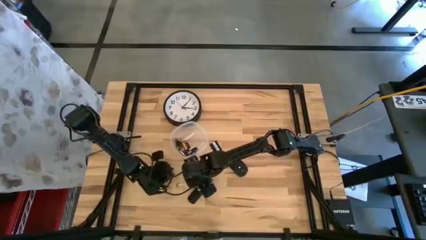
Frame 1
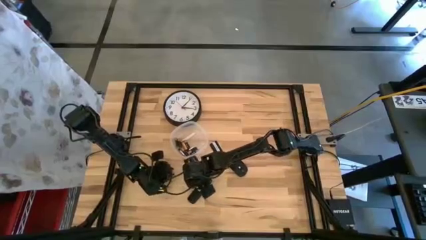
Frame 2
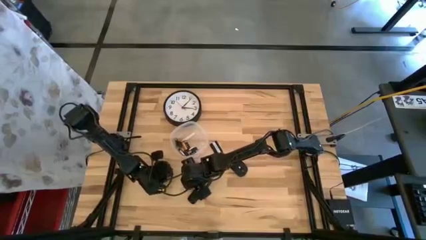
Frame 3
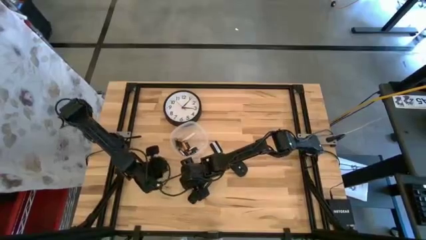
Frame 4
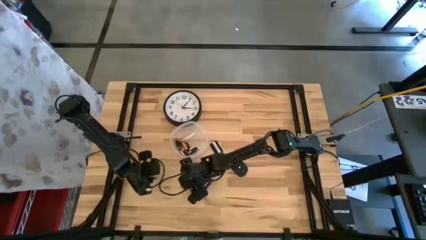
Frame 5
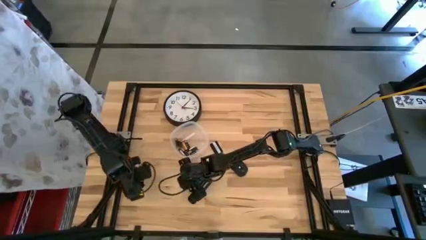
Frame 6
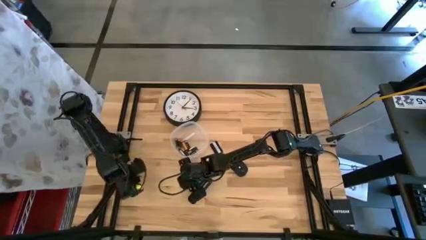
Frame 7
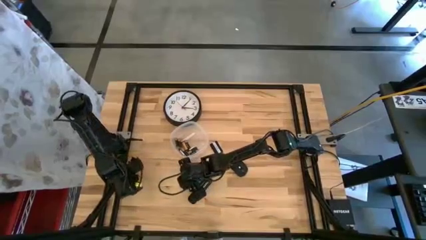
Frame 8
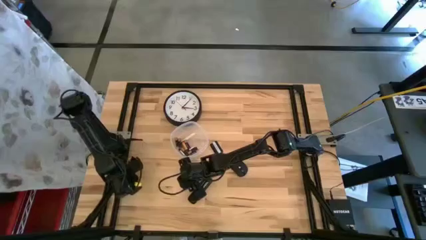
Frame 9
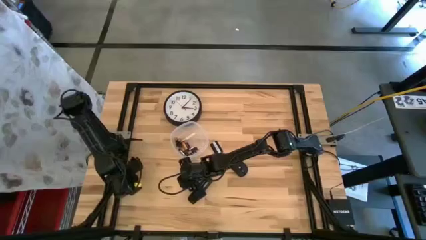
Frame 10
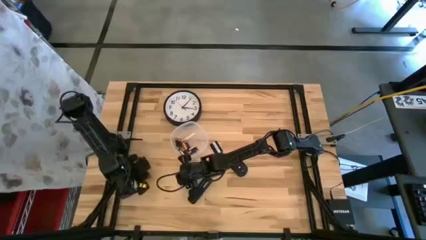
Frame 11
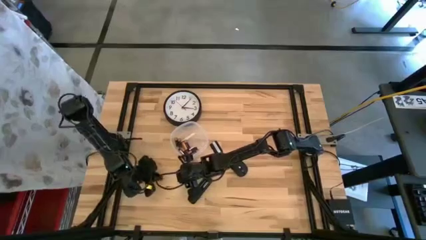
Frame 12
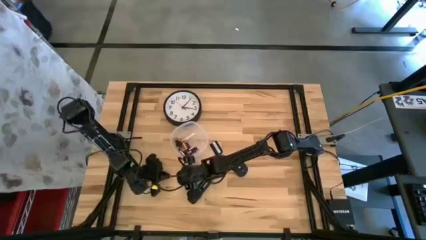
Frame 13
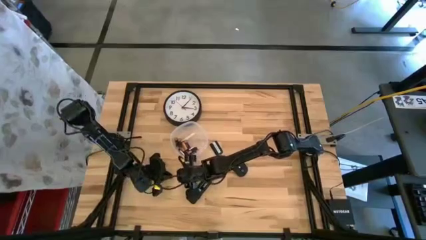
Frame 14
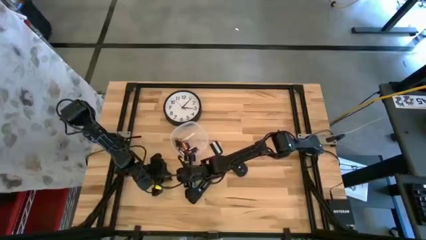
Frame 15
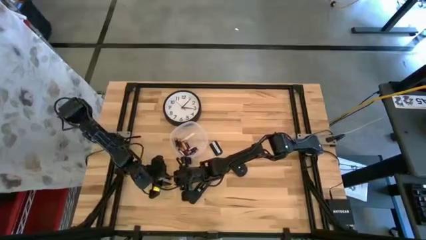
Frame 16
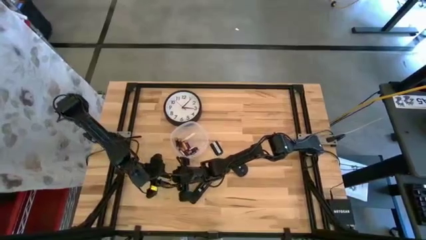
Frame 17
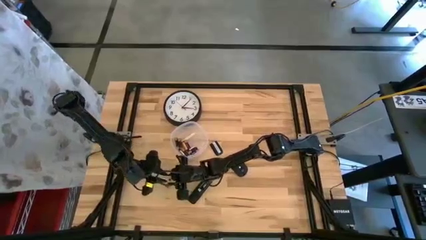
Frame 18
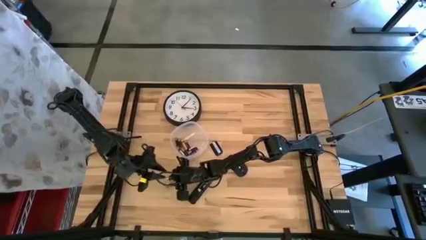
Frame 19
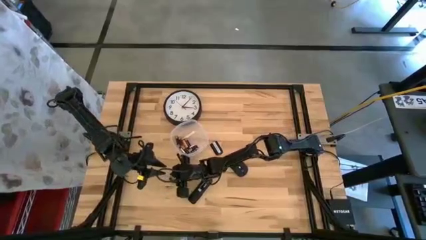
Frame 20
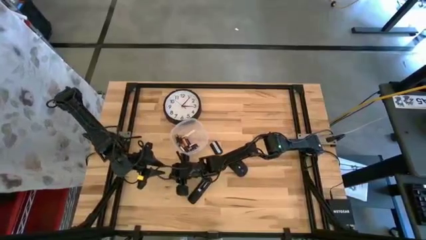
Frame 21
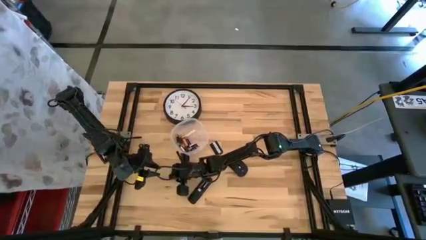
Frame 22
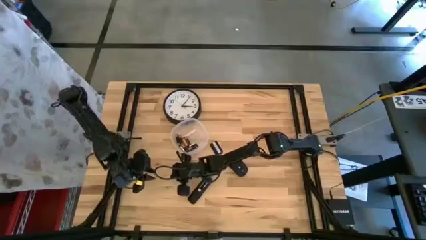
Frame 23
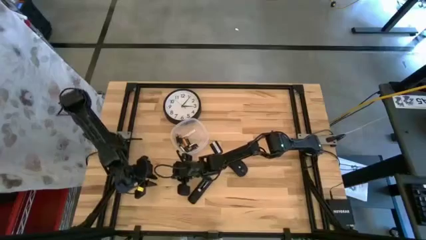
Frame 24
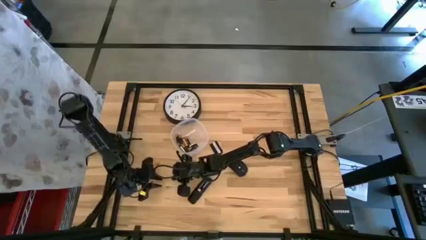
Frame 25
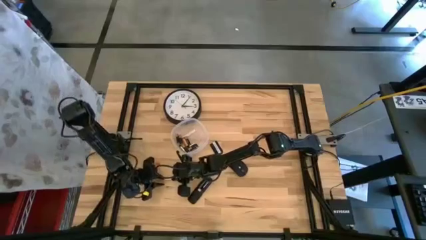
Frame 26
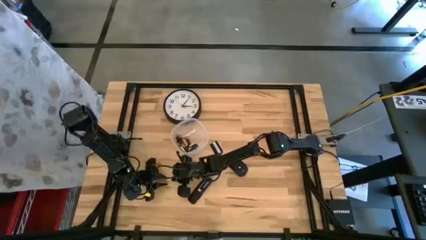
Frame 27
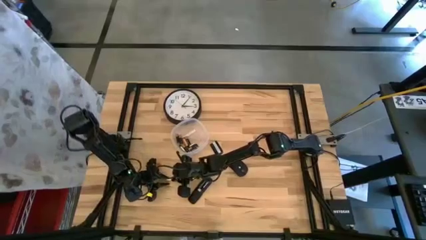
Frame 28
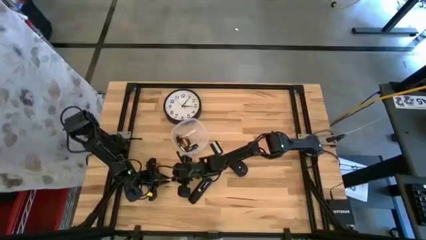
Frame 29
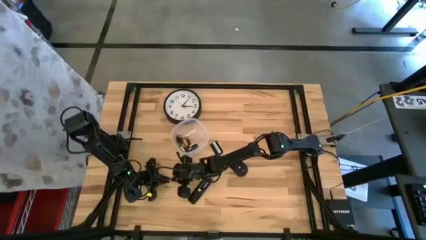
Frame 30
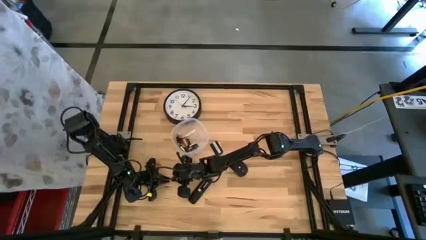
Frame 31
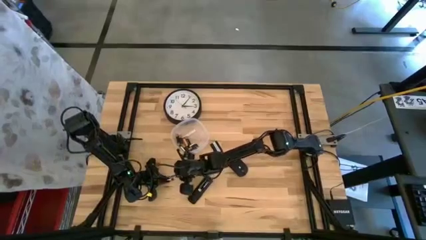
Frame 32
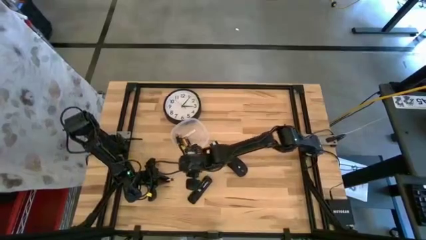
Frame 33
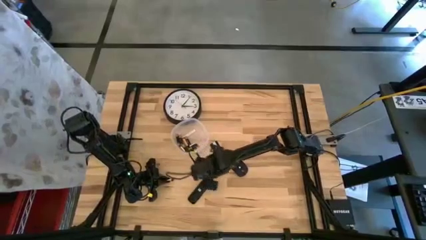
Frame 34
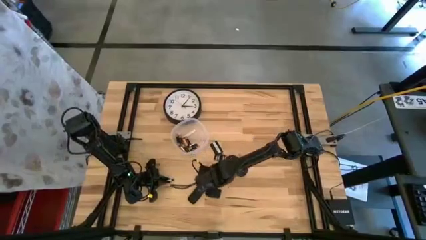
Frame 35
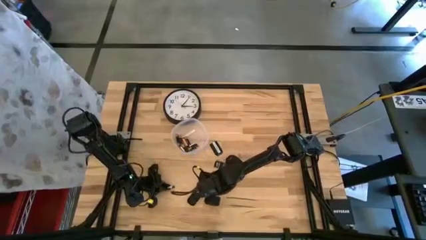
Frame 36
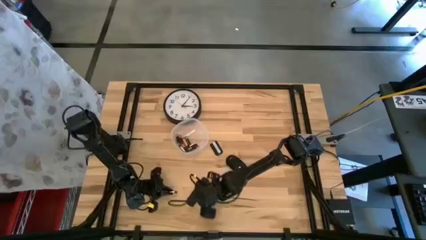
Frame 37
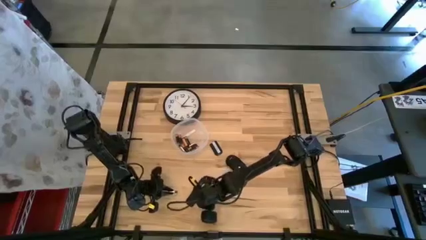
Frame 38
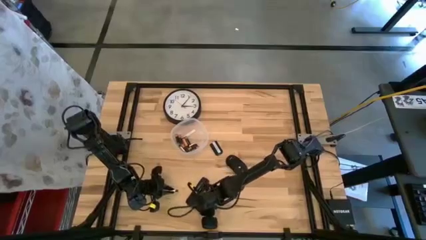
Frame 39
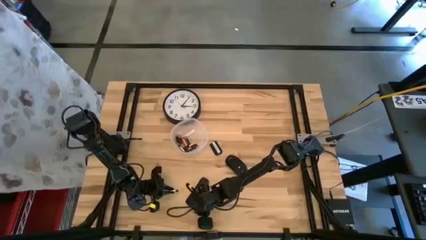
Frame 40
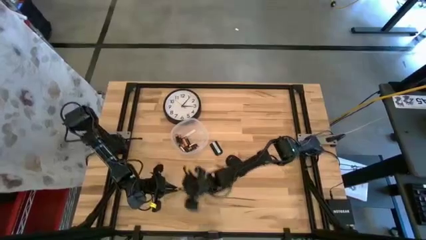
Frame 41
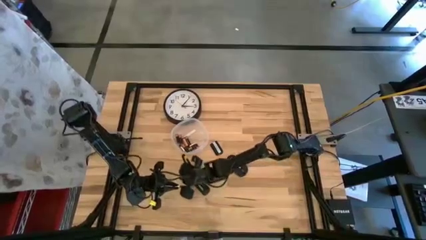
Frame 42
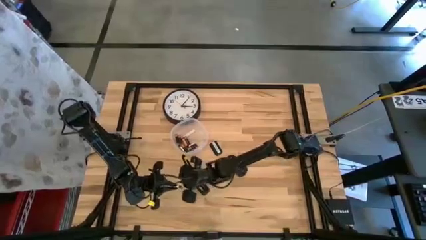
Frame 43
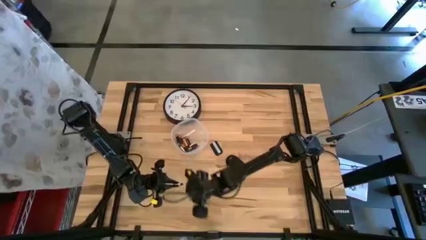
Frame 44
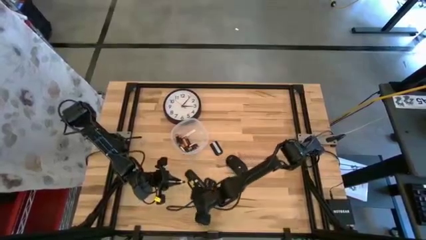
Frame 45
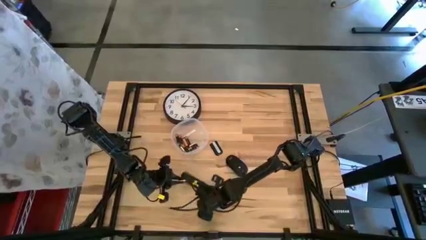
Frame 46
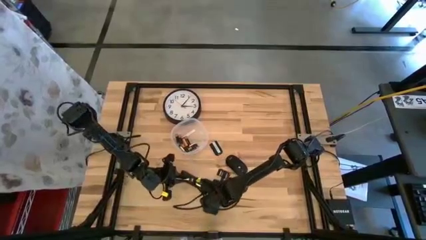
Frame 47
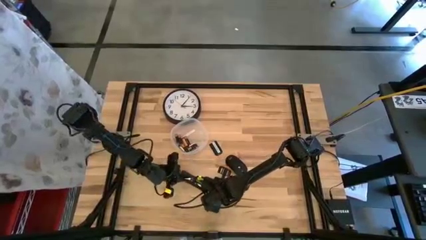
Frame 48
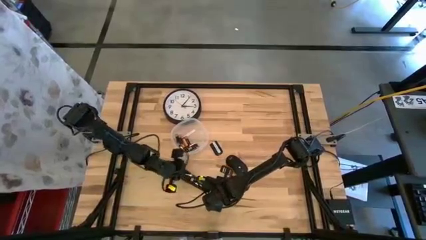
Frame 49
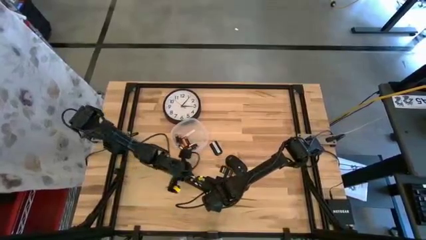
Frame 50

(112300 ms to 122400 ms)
Task: Insert battery
Insert the silver battery into the remote control
